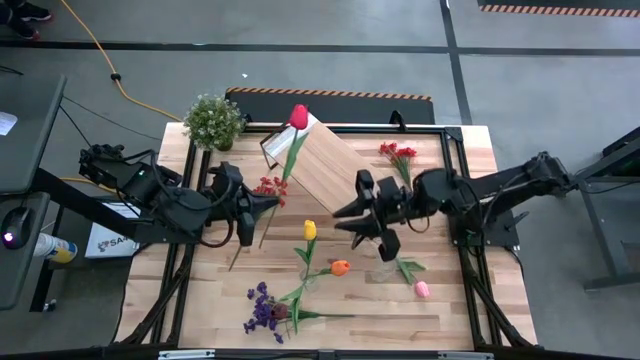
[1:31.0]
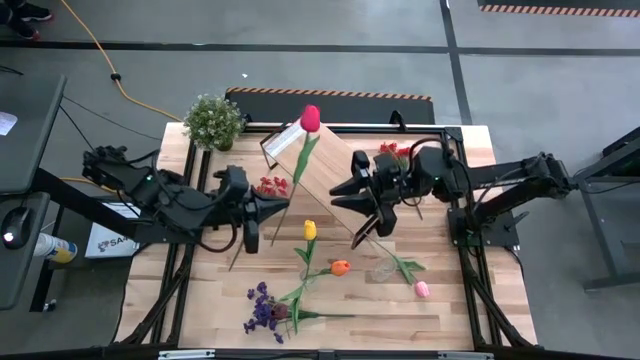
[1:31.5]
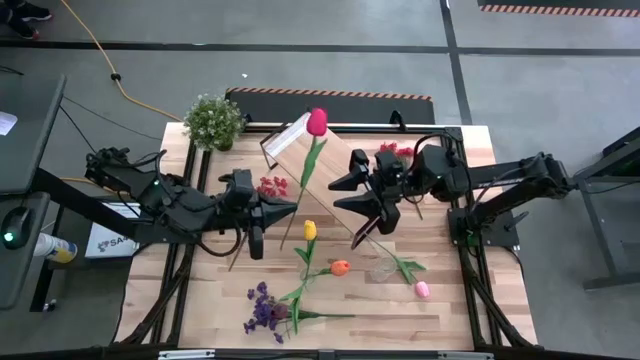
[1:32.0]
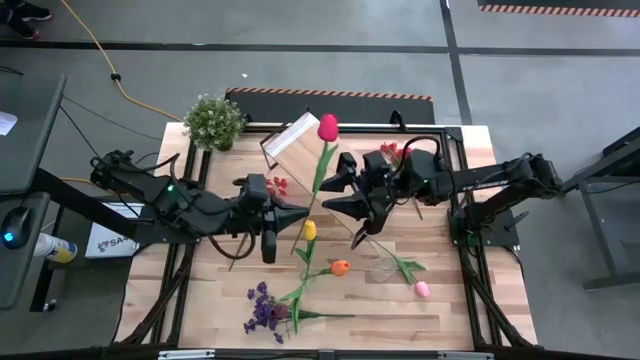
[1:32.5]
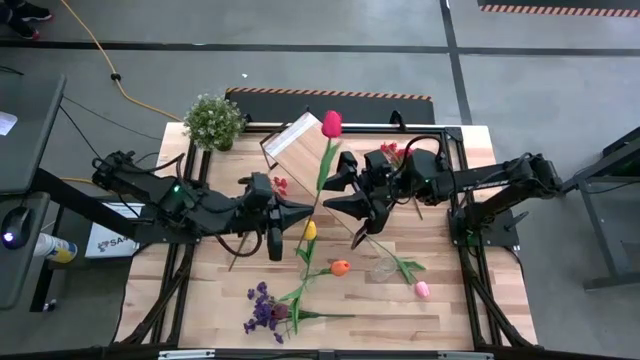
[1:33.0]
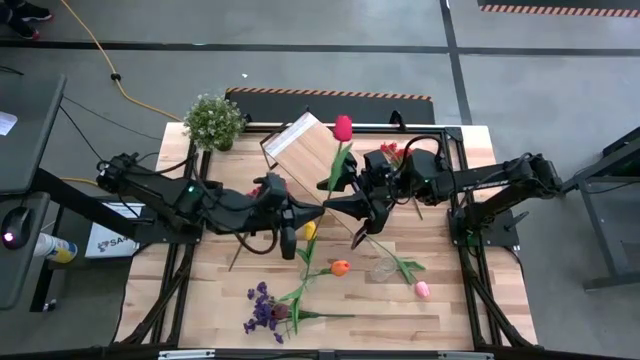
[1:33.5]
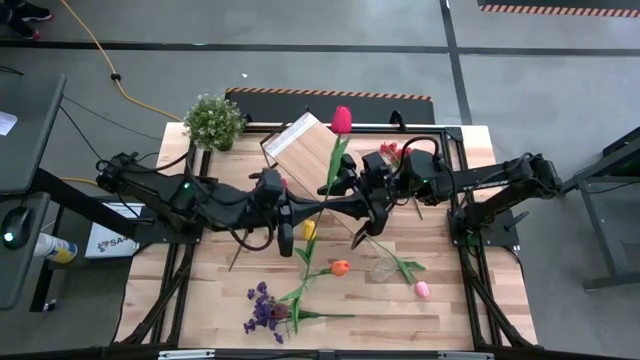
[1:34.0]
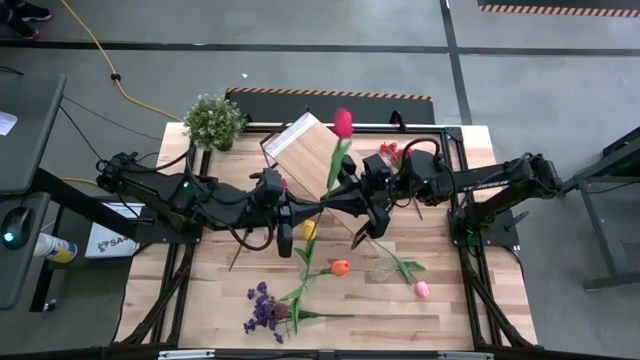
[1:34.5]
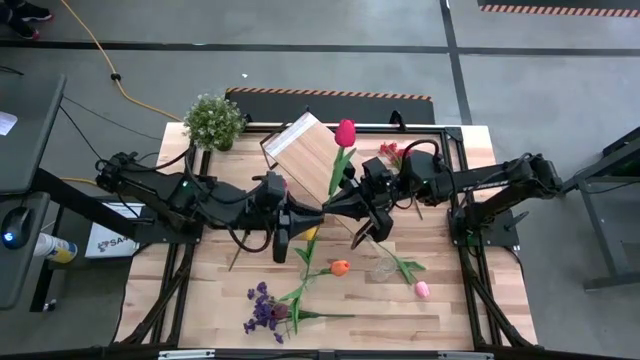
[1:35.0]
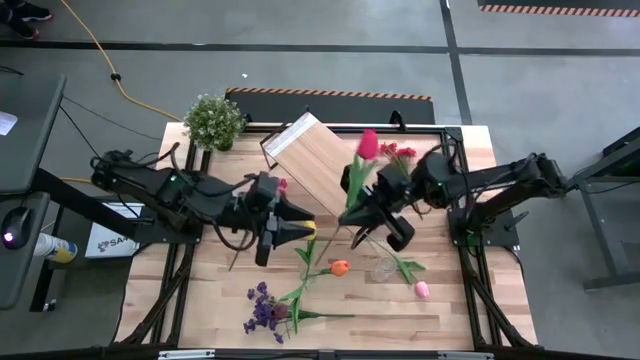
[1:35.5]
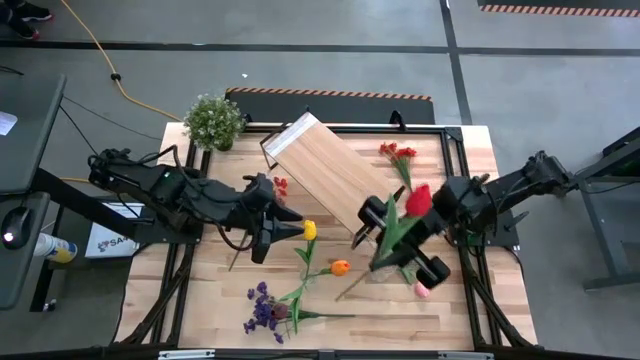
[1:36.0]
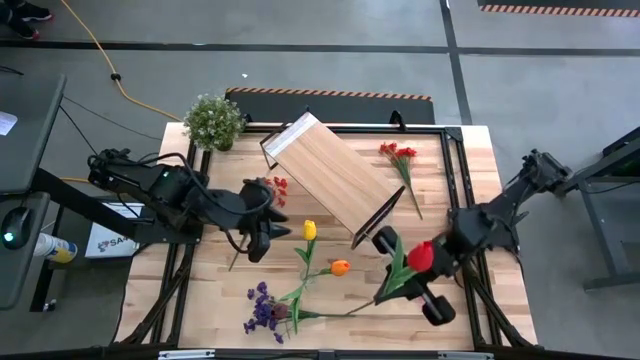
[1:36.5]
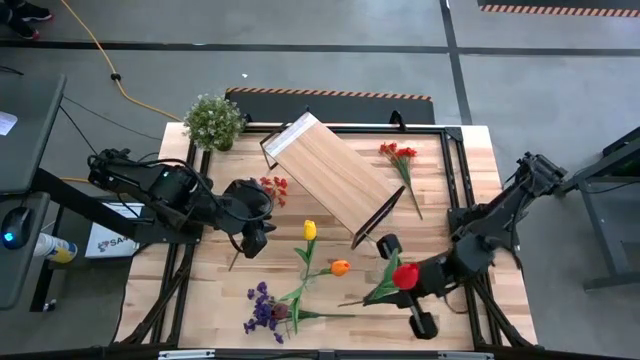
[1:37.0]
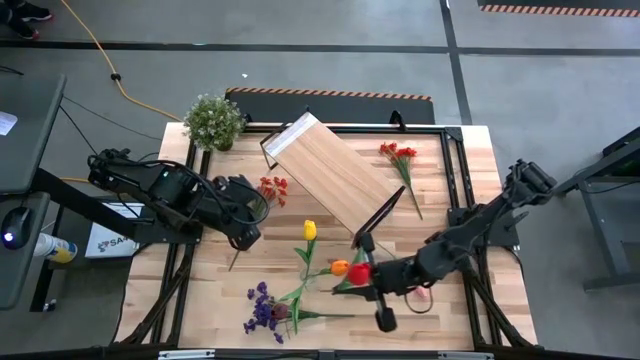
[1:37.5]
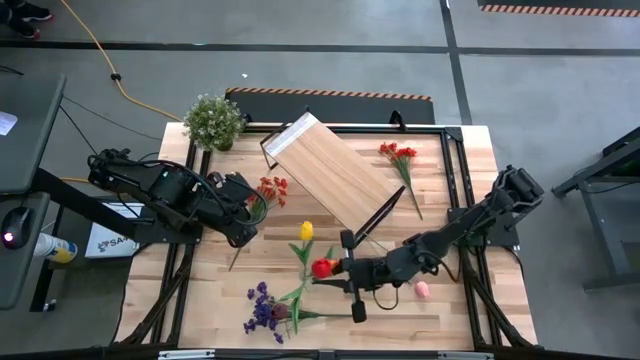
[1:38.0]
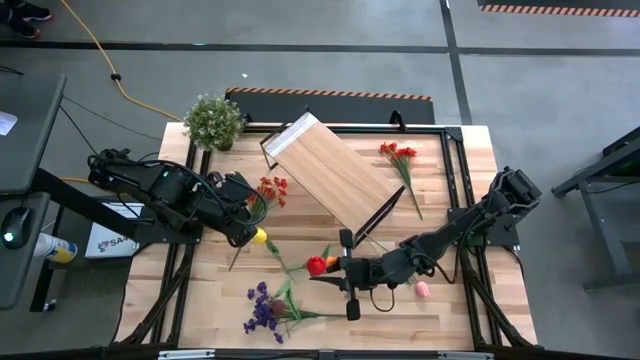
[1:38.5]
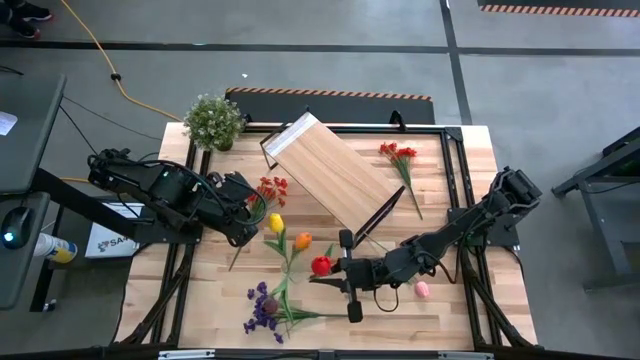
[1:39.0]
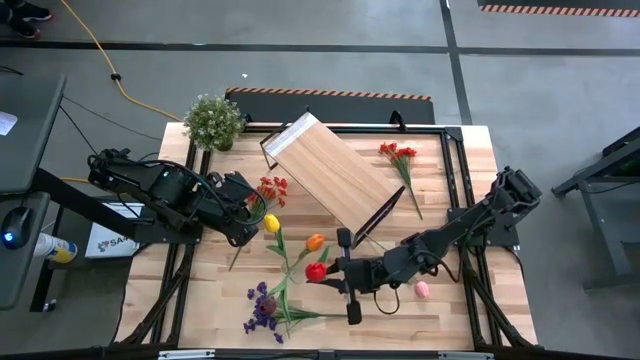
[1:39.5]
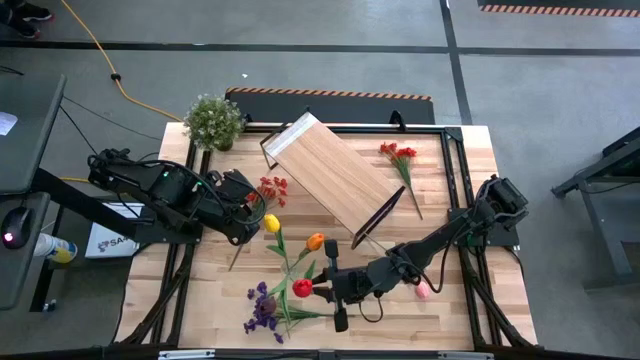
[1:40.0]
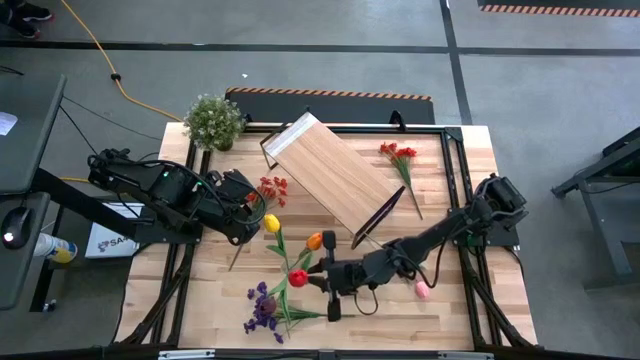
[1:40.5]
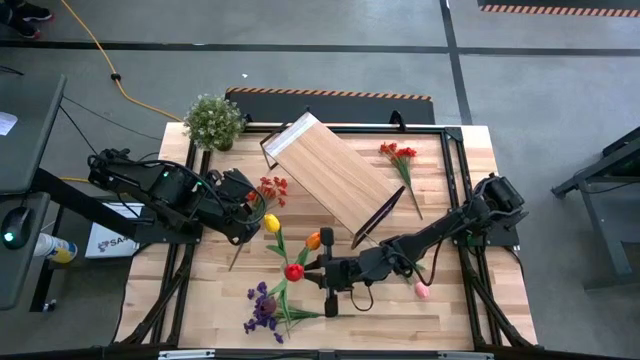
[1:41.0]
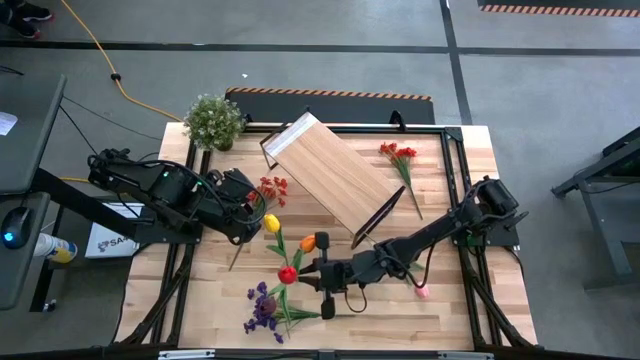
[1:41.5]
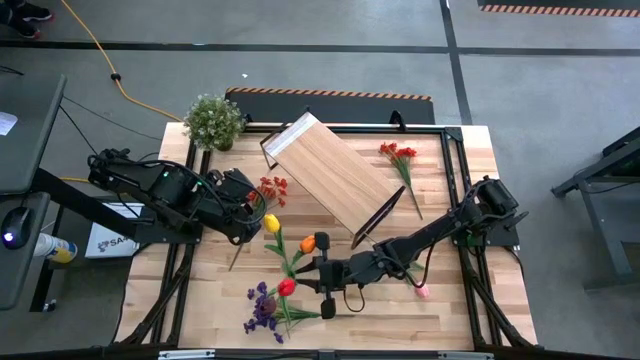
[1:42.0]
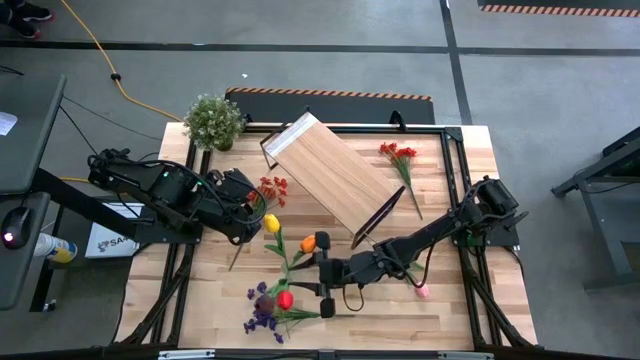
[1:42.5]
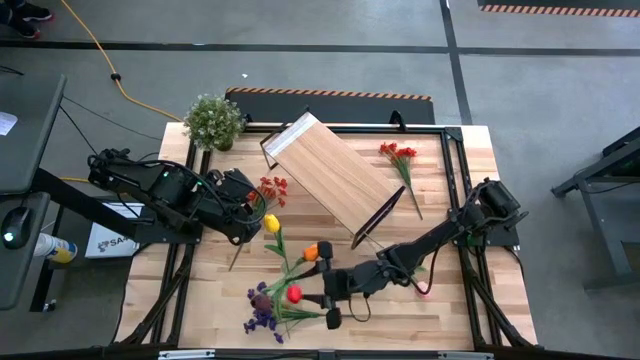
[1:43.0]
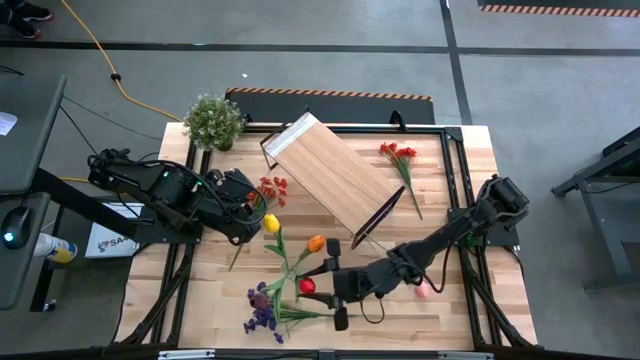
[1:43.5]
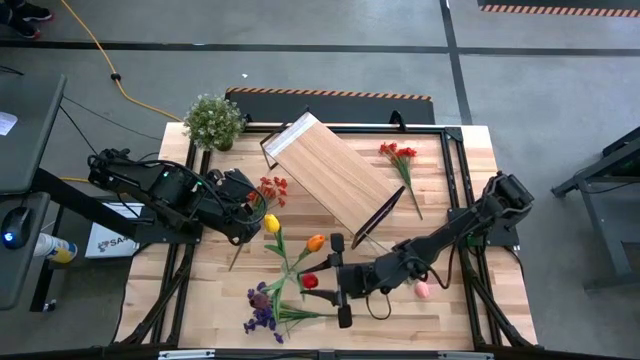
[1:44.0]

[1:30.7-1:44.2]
Task: Pick and place flowers into a vace then onto a shelf
Put the red tulip into the left transparent vase

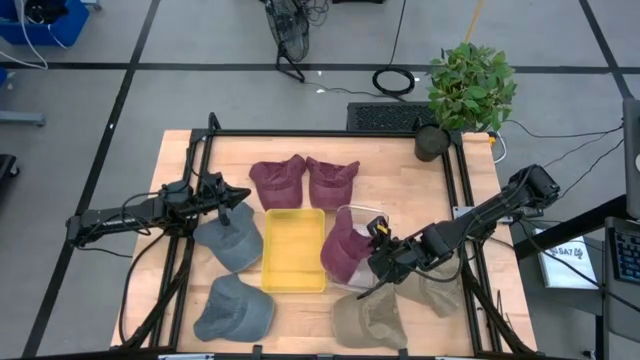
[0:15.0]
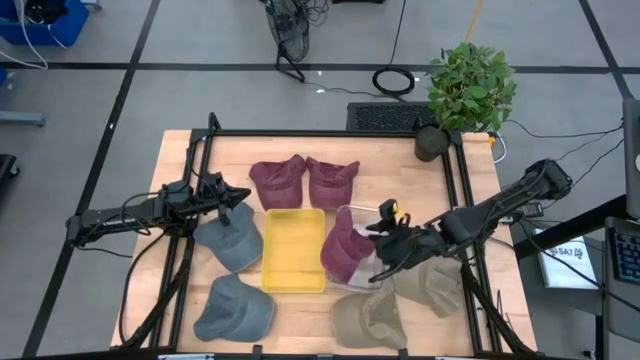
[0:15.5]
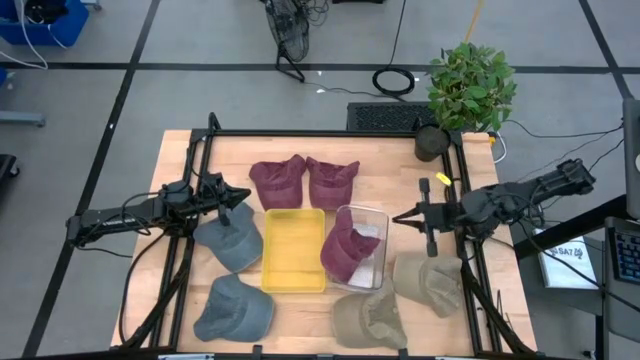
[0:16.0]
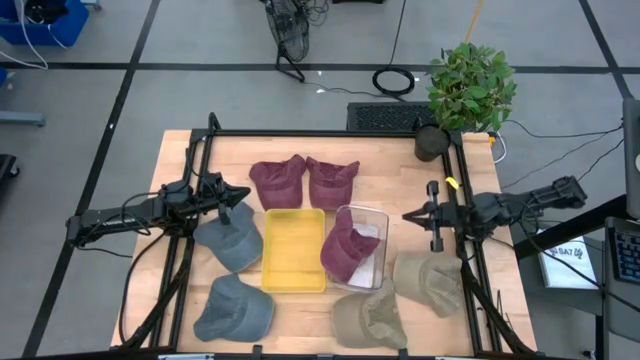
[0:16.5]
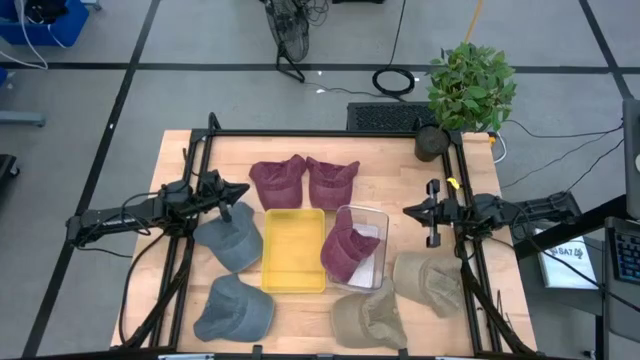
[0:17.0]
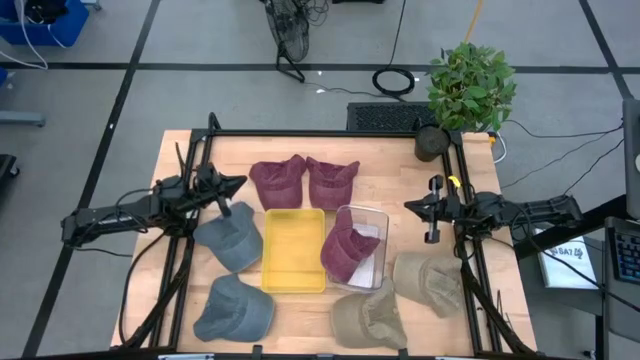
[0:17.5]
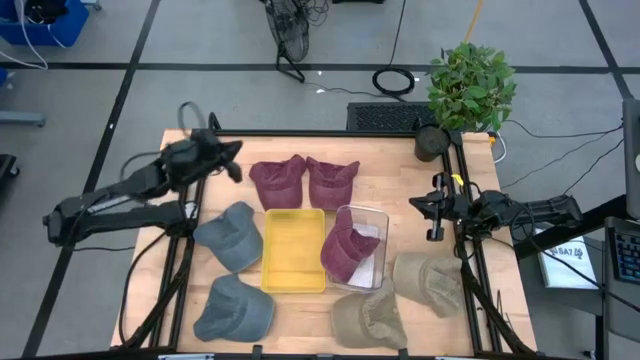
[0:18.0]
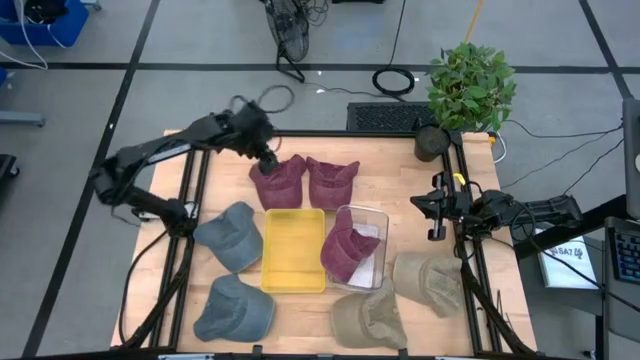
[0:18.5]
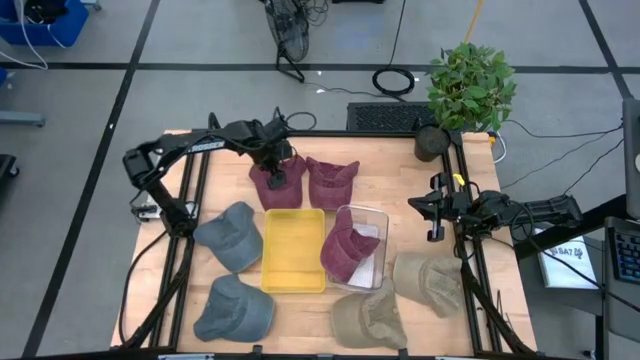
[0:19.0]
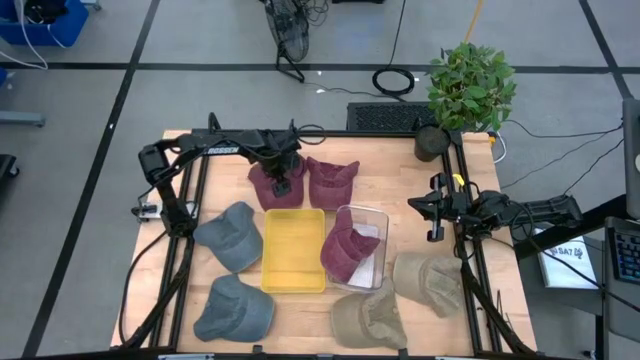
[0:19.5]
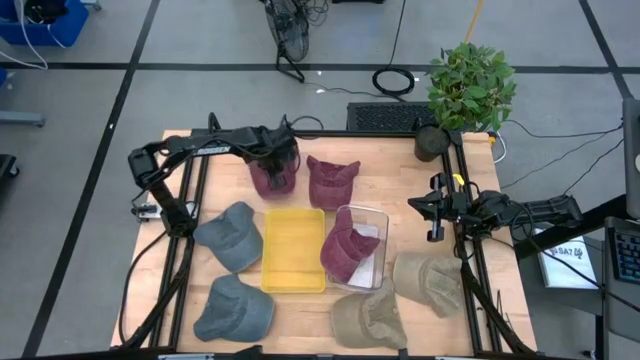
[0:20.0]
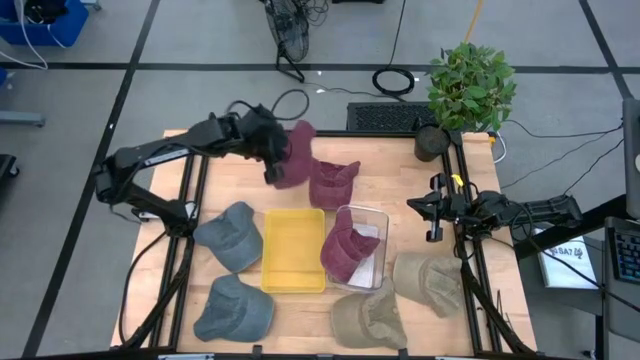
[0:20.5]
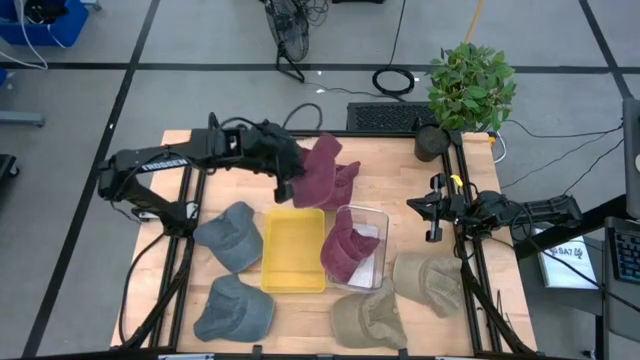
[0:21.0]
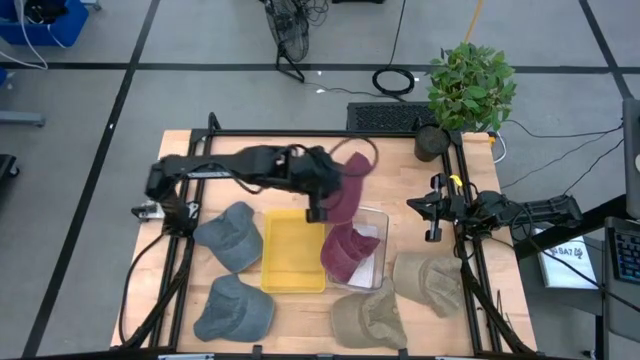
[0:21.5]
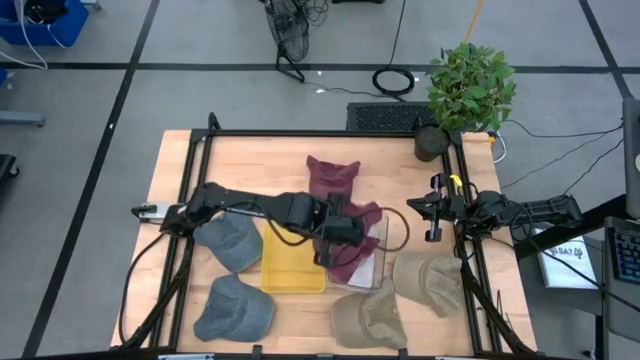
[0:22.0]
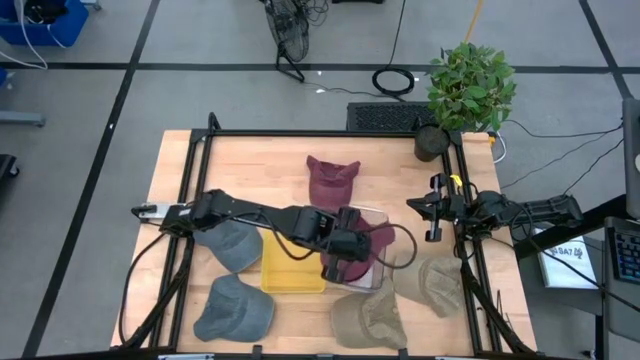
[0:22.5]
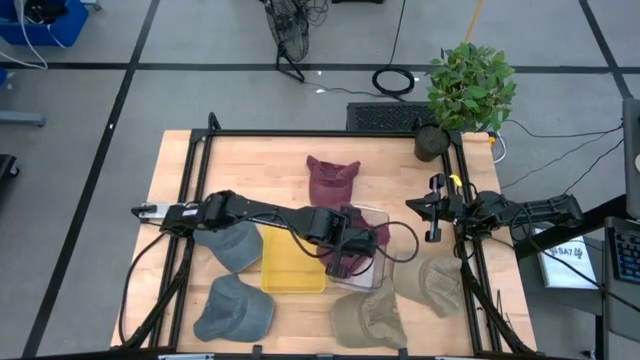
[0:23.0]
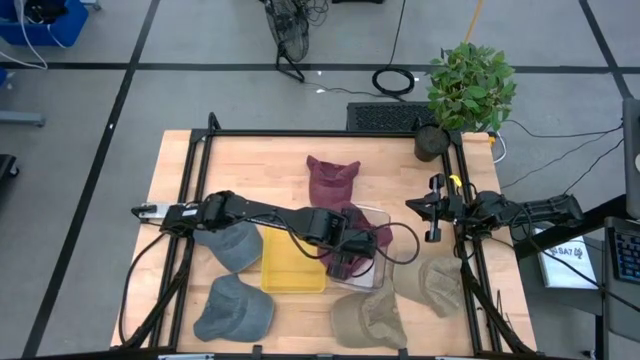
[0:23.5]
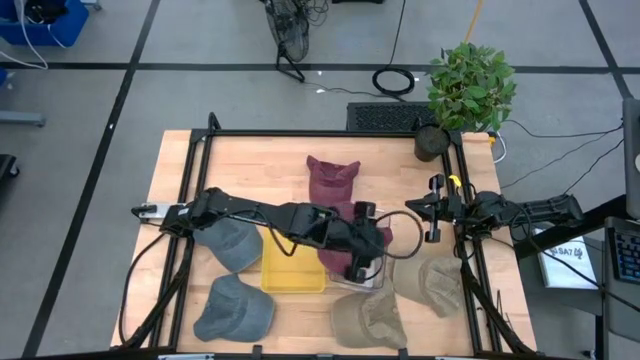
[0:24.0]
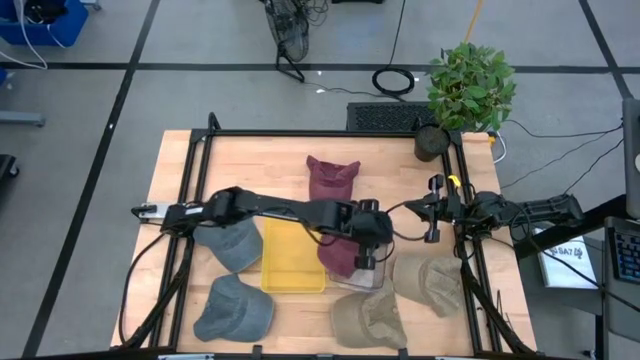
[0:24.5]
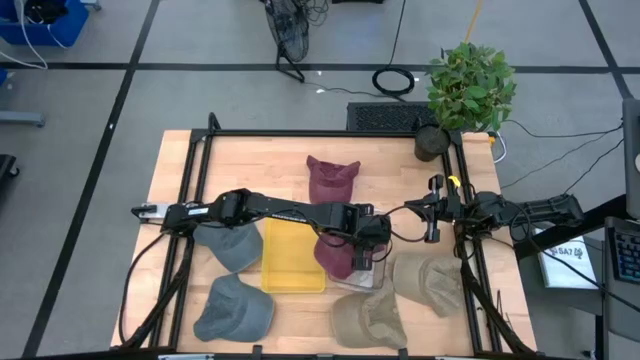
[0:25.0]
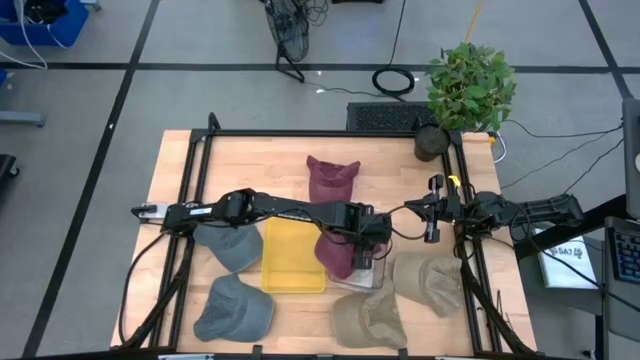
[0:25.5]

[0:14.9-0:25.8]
Task: Pick & Place hat
Put the left red cap into the transparent bin
